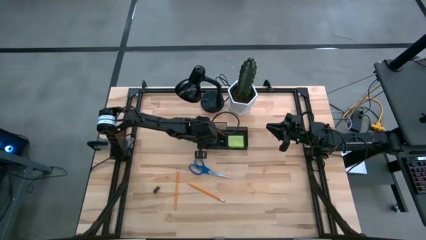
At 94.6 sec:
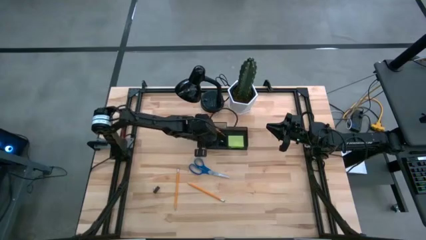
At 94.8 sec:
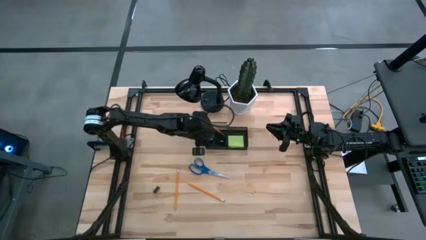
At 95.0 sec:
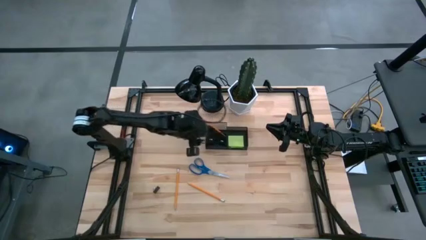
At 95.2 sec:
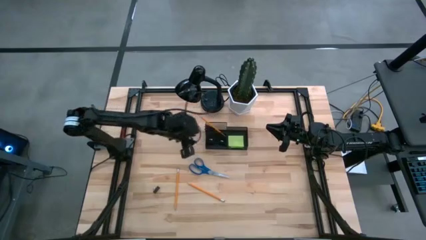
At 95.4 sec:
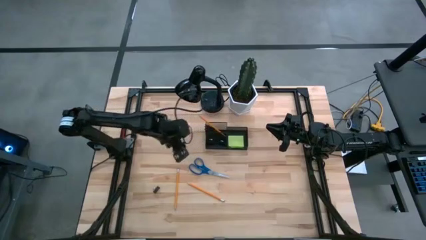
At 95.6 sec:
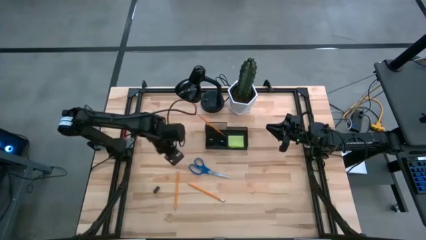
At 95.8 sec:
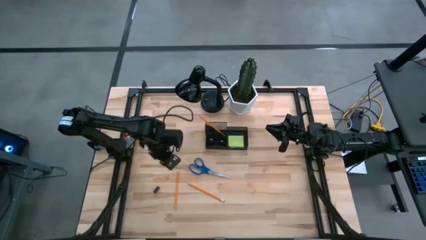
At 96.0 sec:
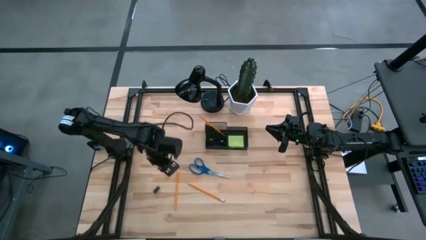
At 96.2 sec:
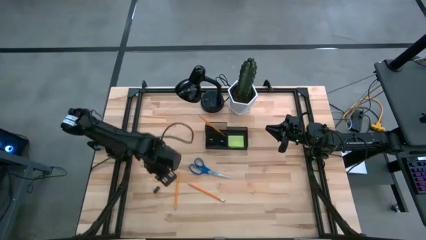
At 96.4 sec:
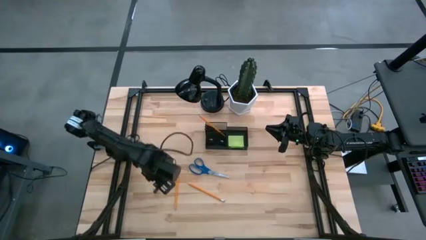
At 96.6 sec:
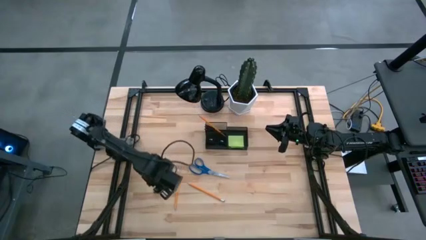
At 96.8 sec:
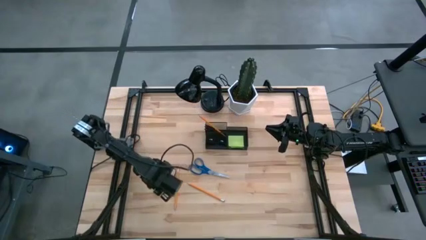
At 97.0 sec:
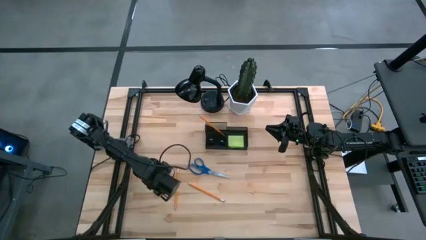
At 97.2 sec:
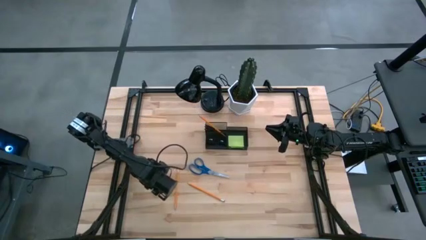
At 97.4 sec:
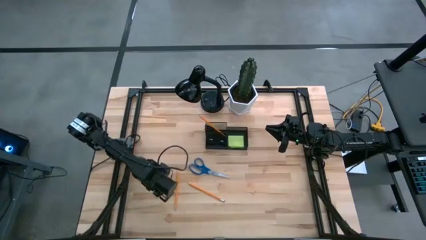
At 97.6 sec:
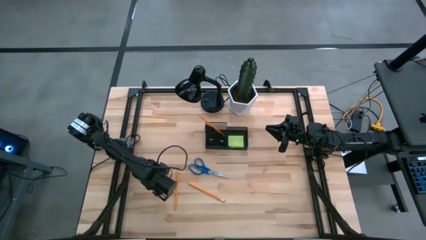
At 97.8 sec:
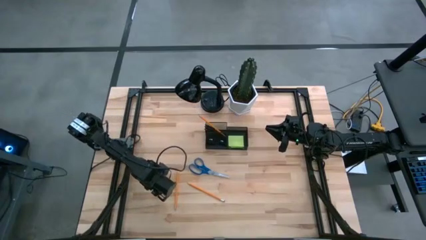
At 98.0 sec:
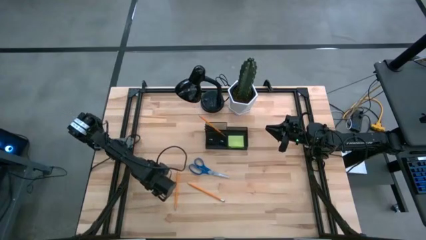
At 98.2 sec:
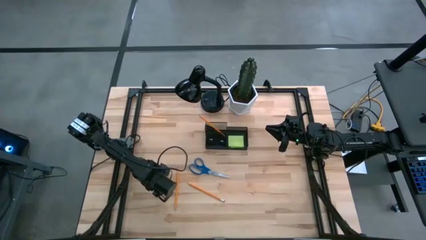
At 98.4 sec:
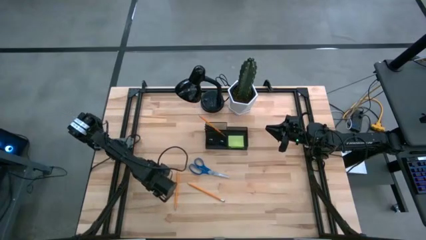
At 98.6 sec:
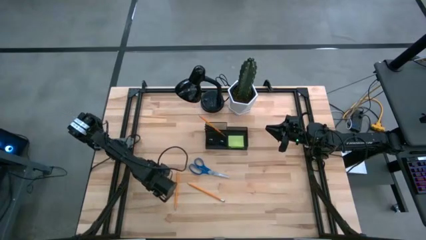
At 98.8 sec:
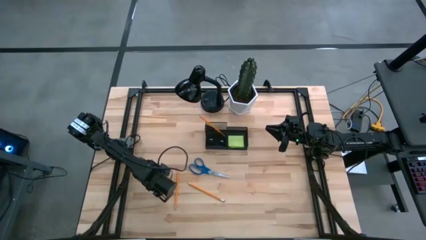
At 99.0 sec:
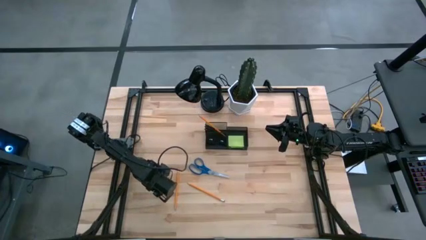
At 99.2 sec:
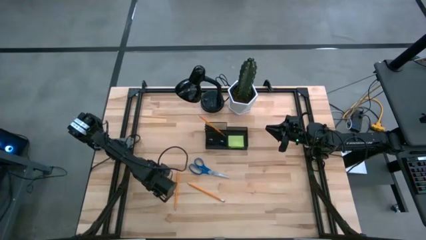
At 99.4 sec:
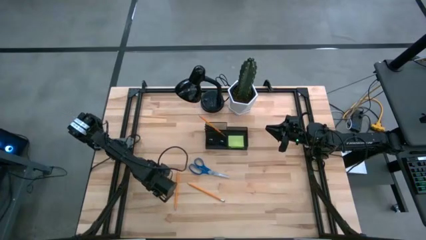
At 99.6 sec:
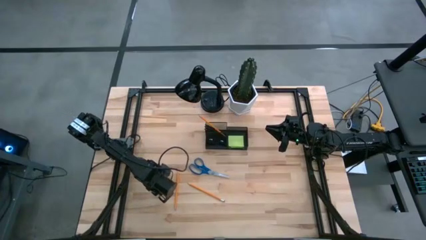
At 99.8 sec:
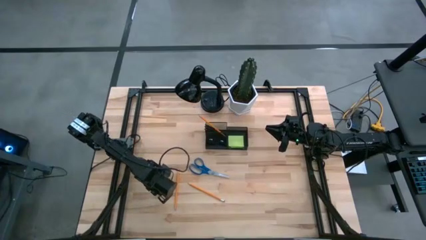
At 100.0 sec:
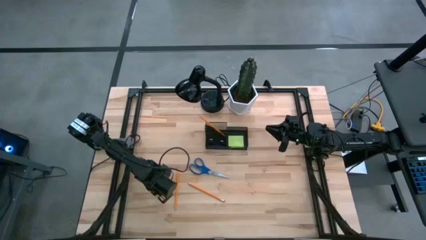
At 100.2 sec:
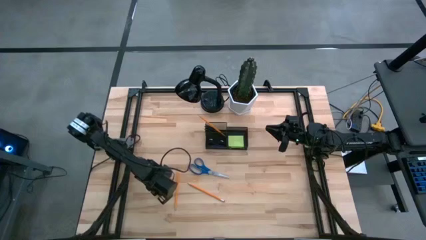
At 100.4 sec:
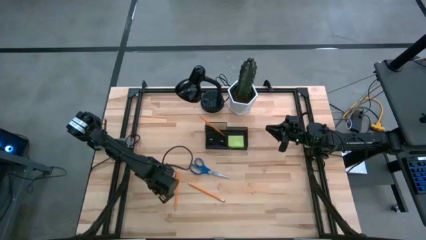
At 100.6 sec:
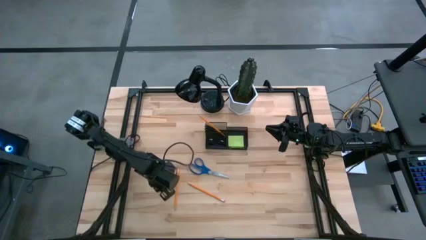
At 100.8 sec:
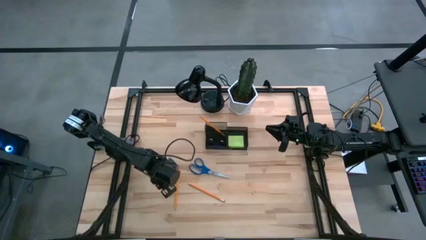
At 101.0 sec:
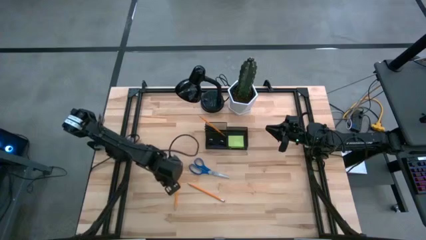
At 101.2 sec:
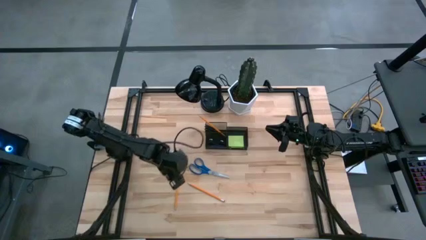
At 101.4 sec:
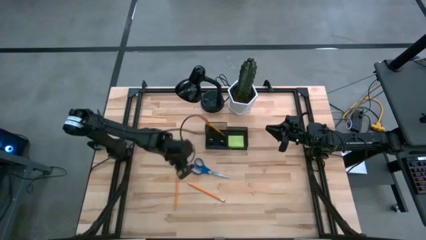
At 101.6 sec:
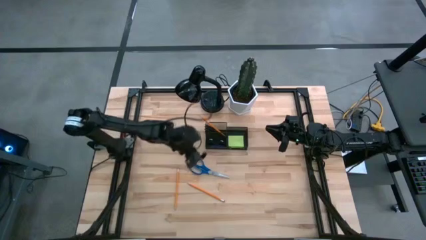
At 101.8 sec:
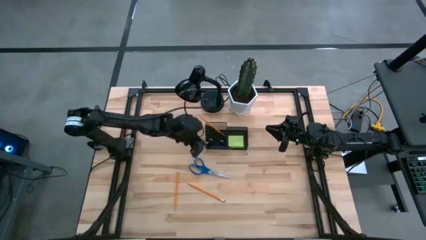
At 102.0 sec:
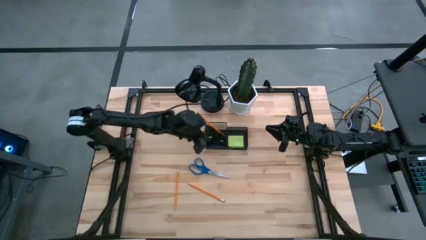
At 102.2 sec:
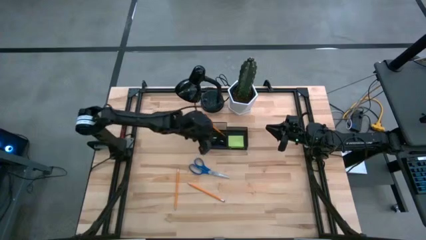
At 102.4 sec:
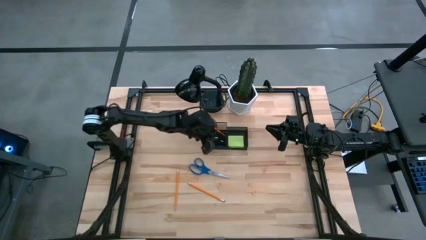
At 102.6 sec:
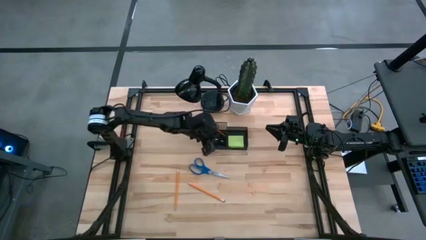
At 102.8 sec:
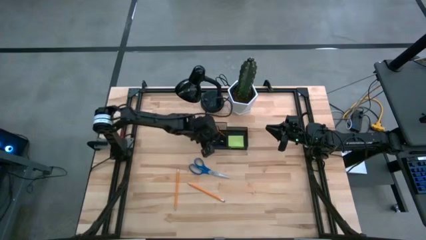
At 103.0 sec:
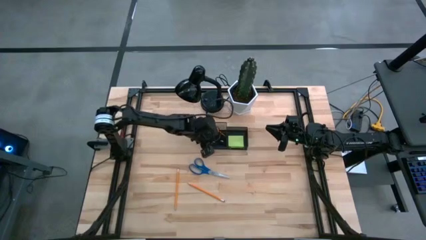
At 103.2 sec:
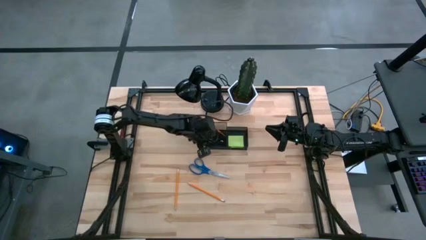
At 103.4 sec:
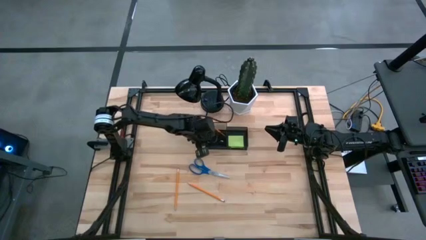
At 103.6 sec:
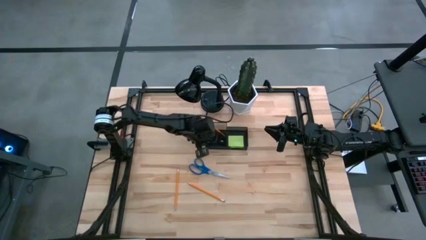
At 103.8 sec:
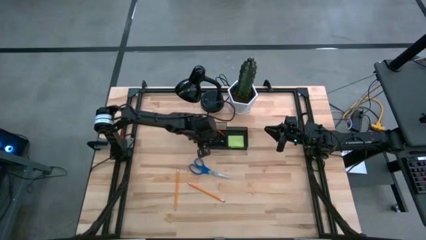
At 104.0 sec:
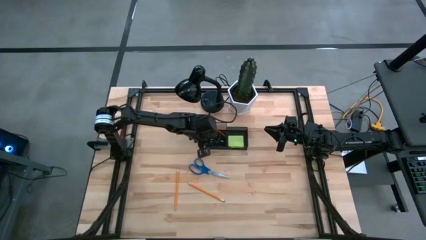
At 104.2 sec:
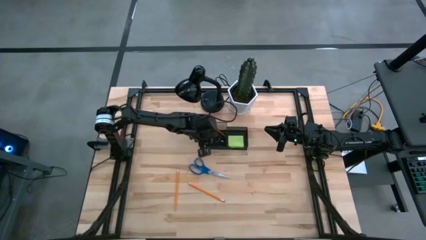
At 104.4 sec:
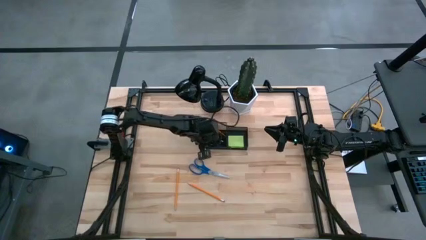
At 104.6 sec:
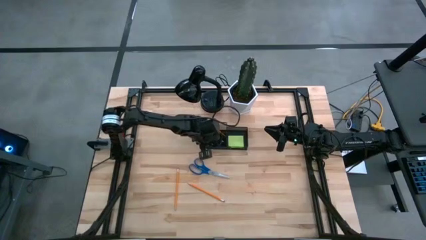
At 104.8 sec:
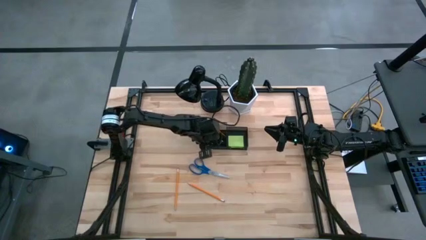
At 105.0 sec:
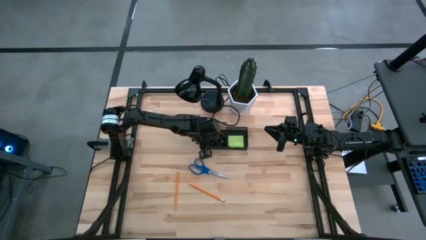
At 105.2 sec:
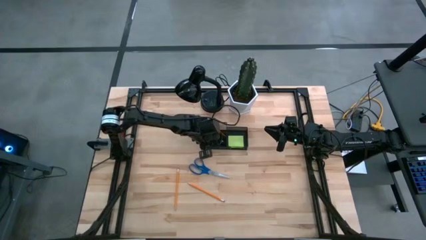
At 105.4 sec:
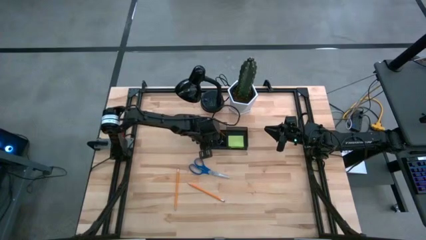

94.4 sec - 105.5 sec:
Task: Pick and place office supplies into organizer
Put the clip into the mesh desk organizer
